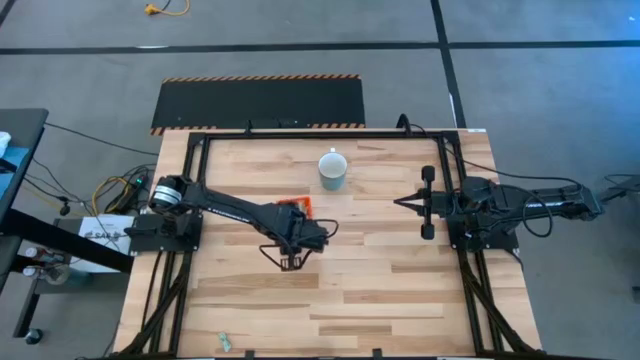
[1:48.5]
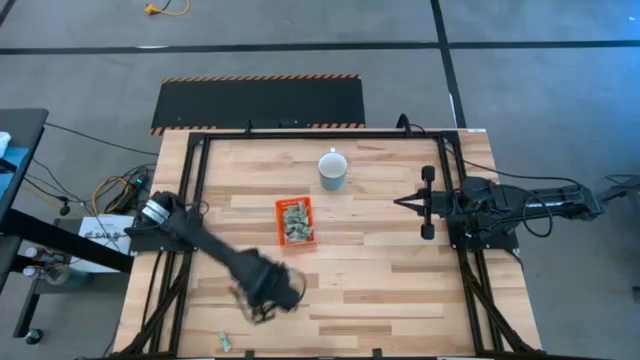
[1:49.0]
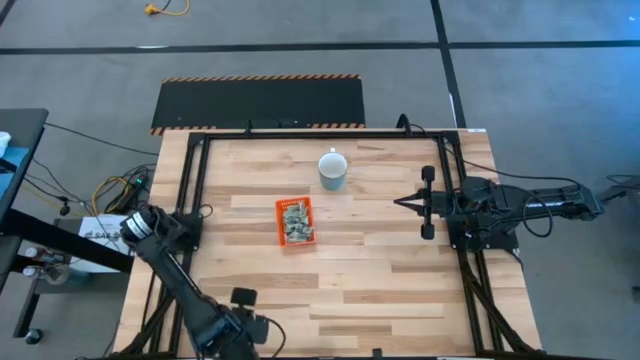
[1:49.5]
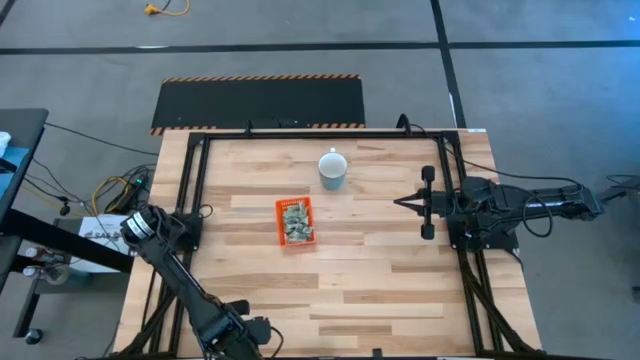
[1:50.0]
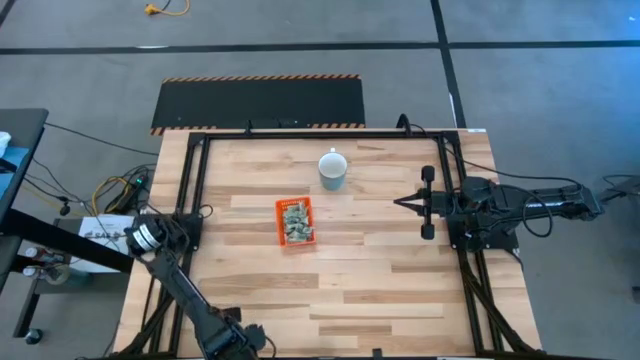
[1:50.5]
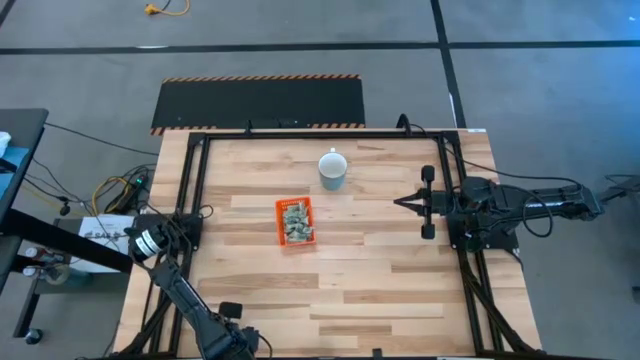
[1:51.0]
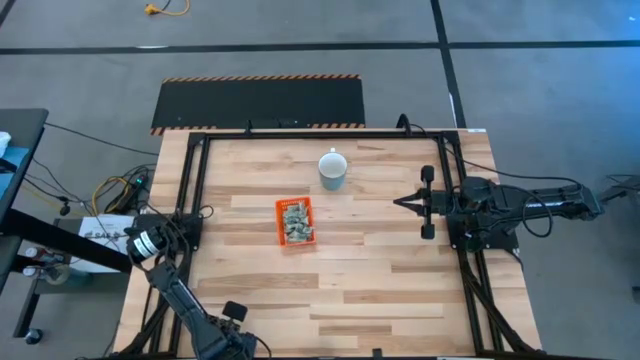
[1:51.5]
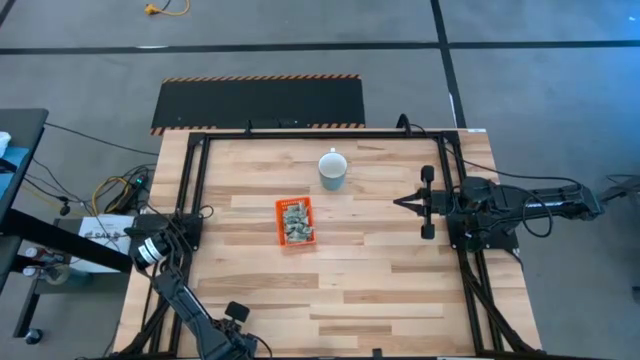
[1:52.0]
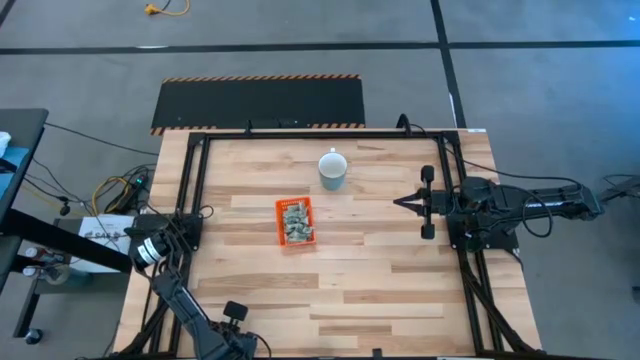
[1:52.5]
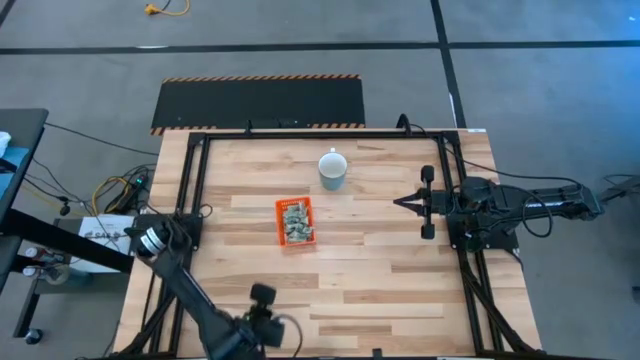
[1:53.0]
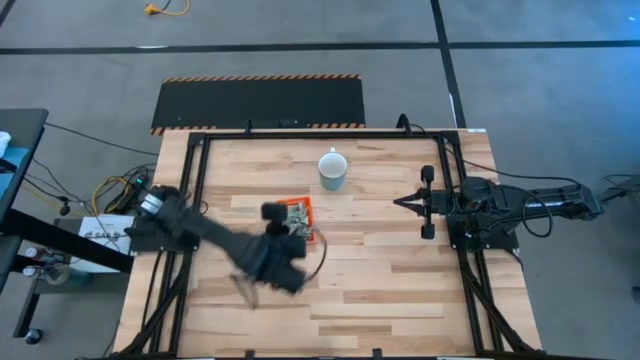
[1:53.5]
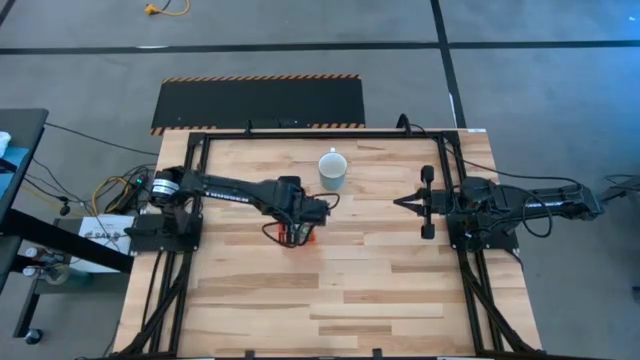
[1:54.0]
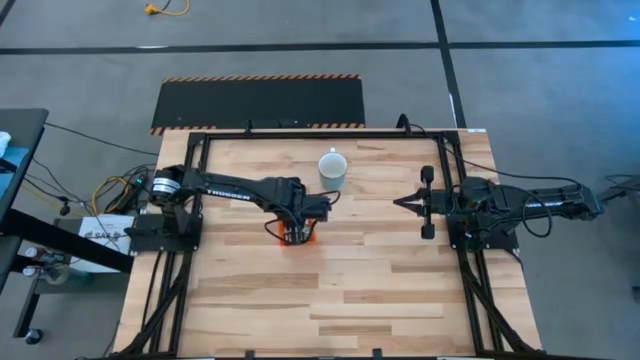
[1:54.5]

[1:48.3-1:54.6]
Task: Pick and place items into bin
Put the green stevia packet into the orange bin

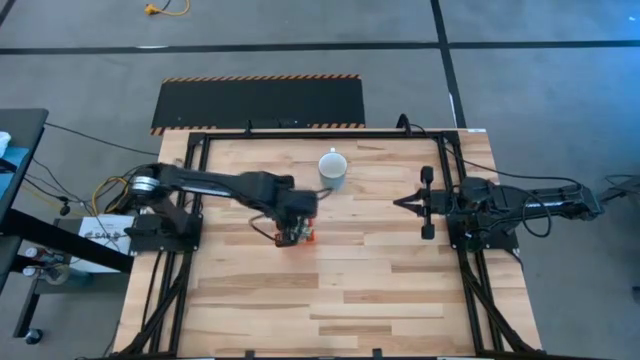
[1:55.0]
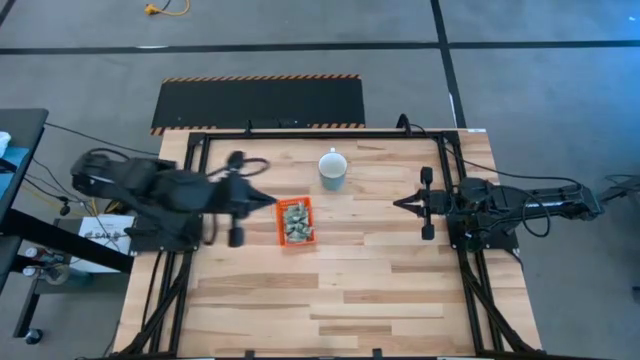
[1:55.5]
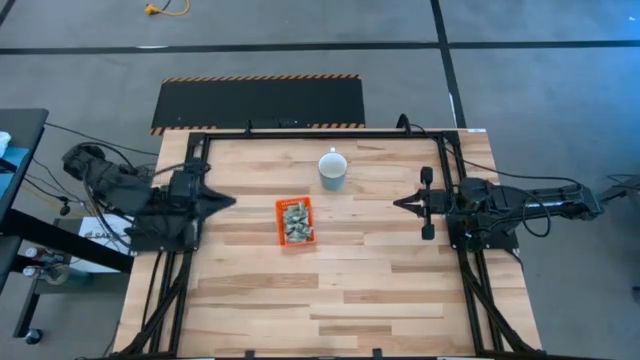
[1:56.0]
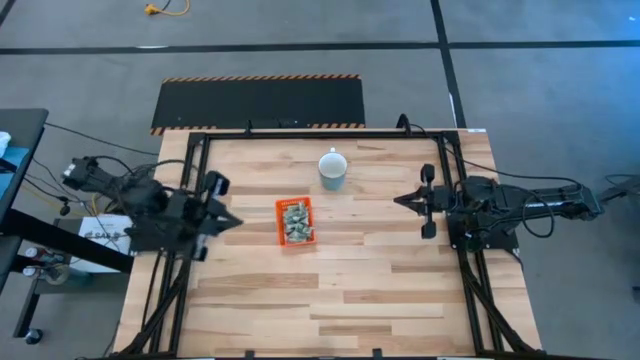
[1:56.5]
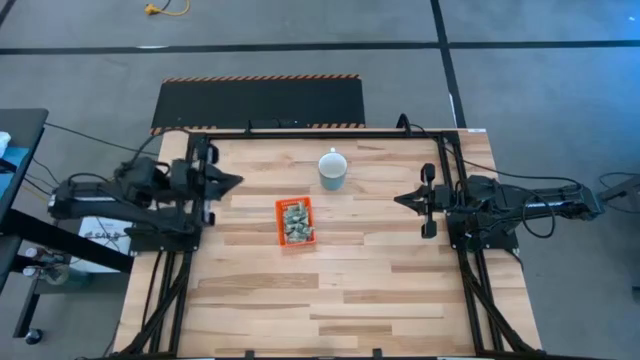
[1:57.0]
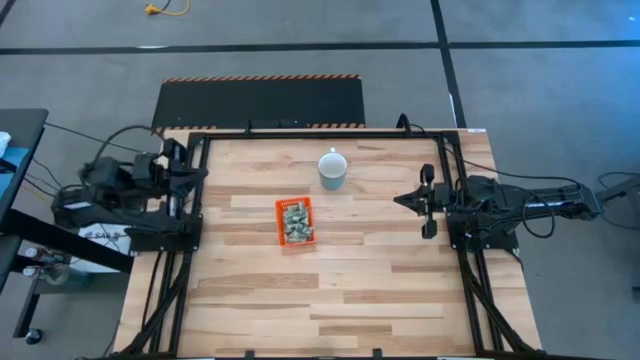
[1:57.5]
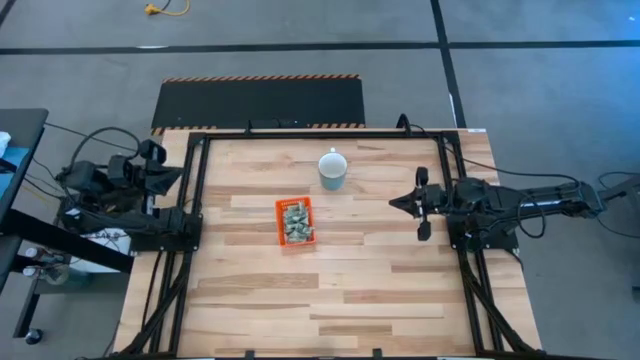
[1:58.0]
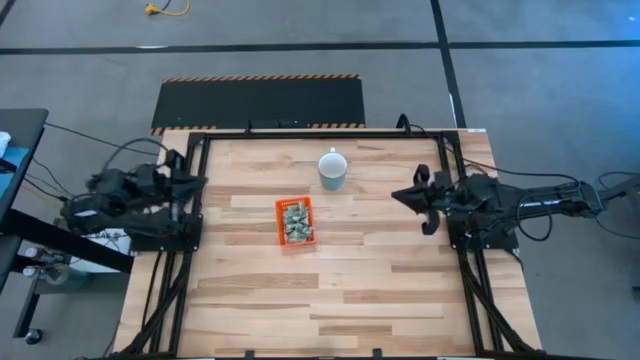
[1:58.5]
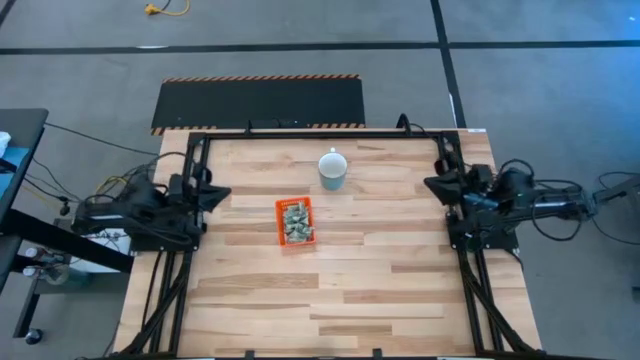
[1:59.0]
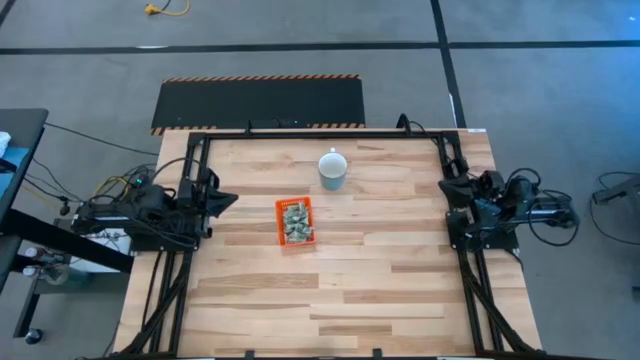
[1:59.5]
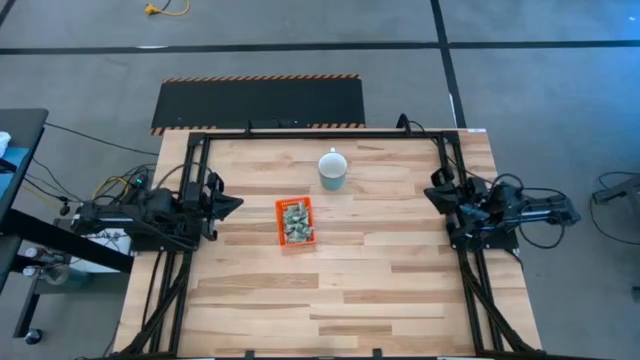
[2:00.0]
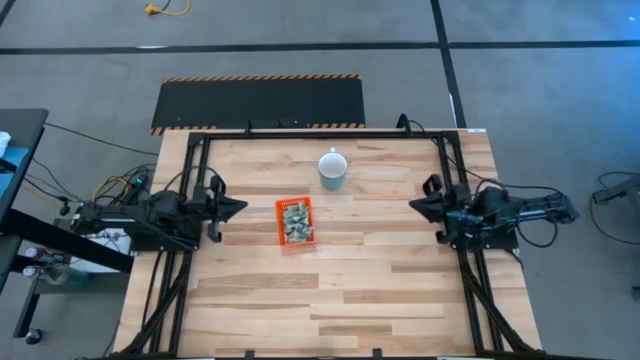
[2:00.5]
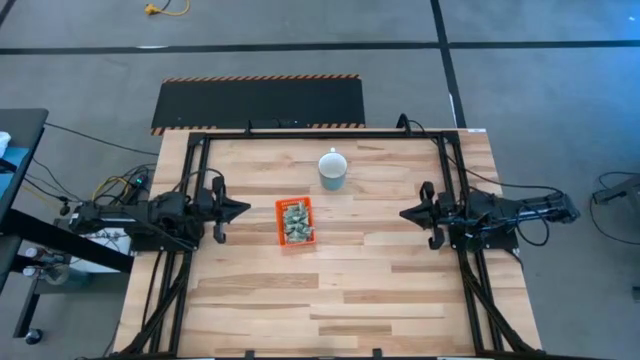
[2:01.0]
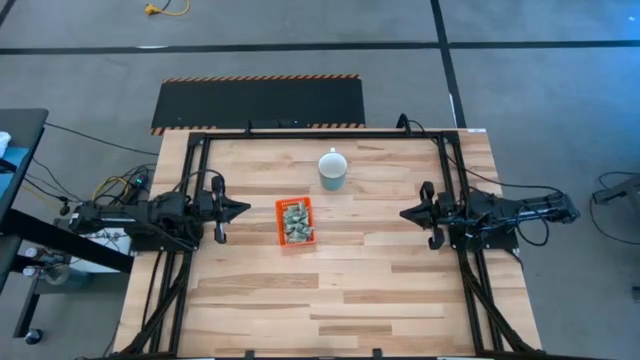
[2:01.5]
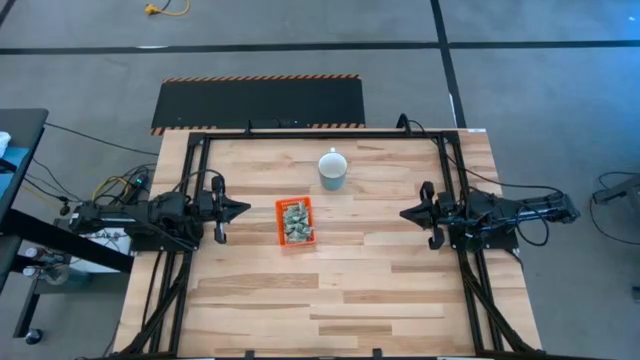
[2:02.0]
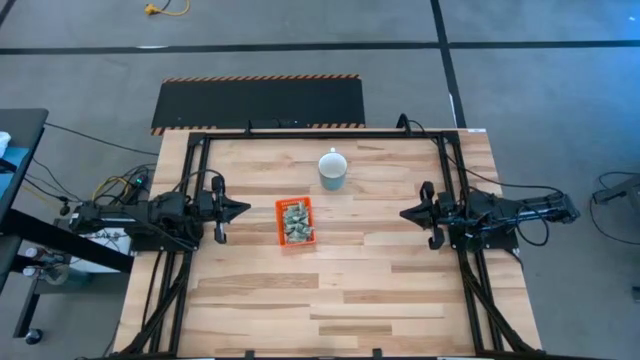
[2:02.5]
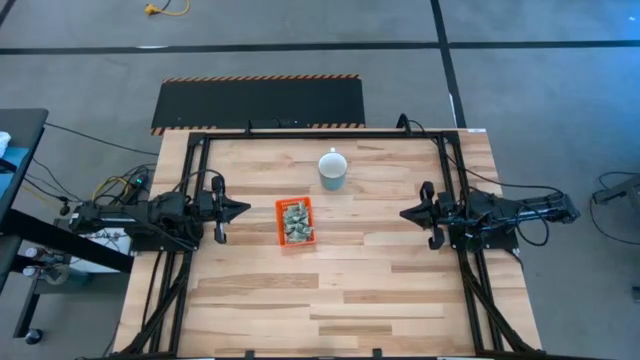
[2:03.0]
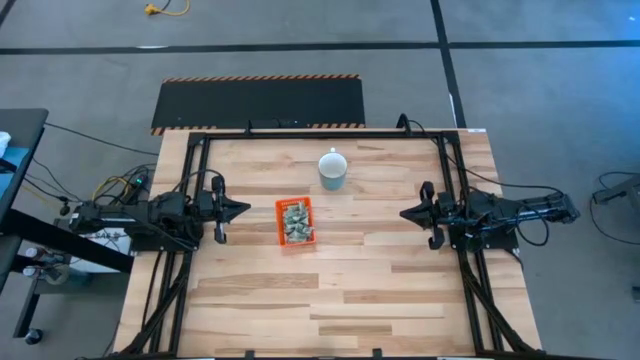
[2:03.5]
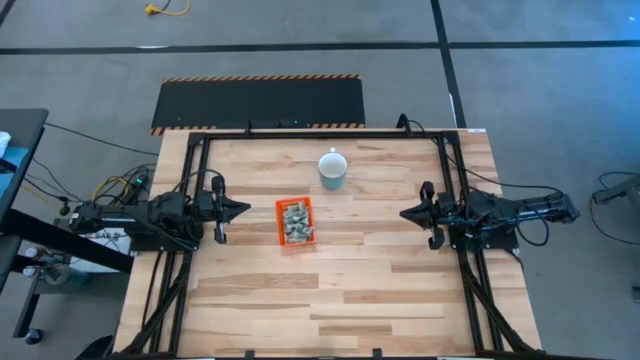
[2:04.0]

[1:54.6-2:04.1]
Return to Home Position

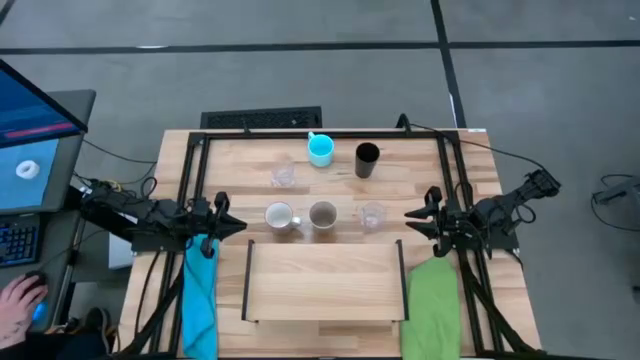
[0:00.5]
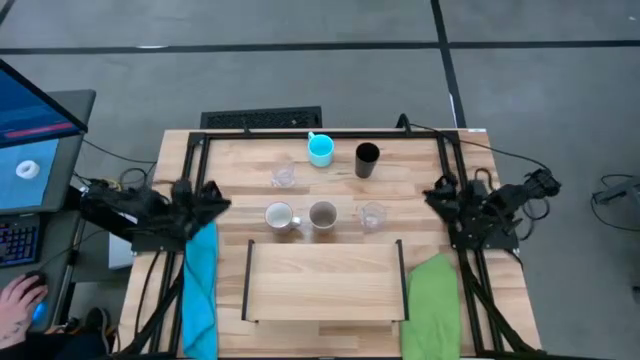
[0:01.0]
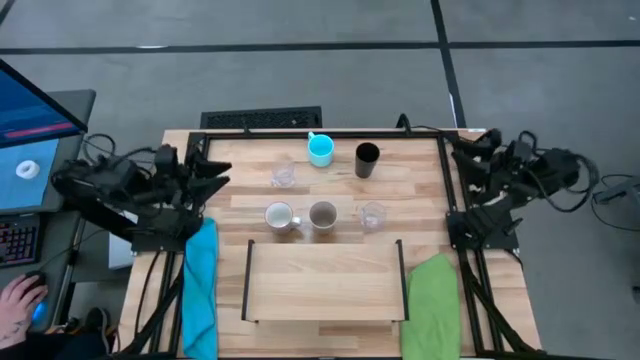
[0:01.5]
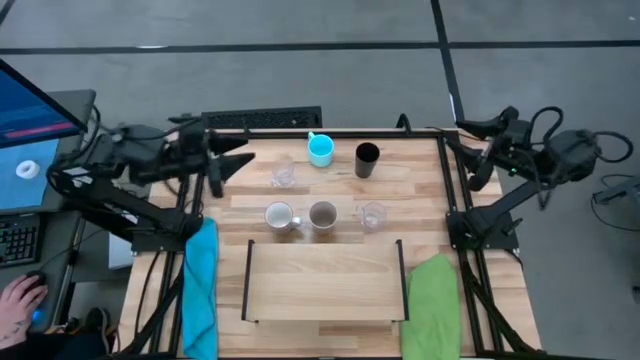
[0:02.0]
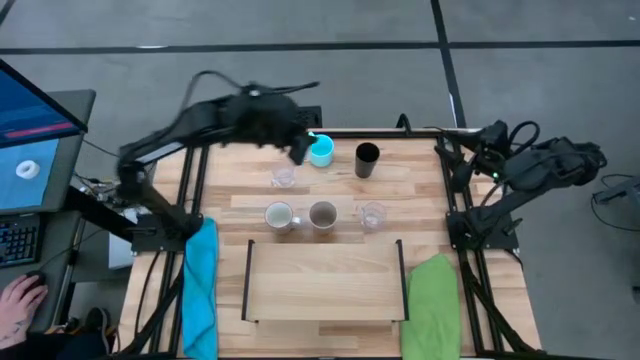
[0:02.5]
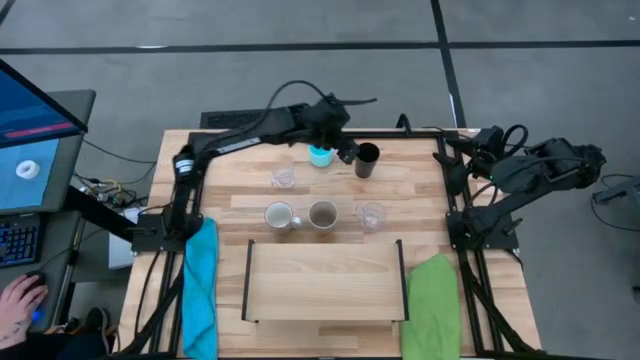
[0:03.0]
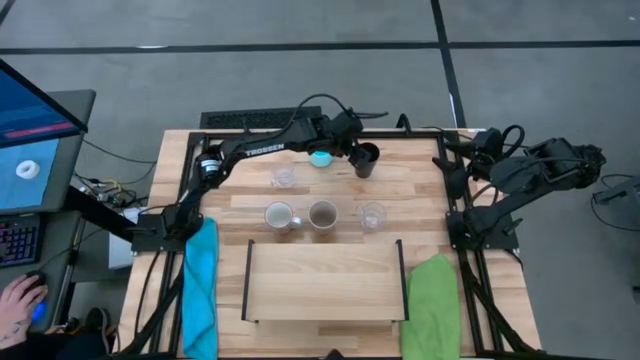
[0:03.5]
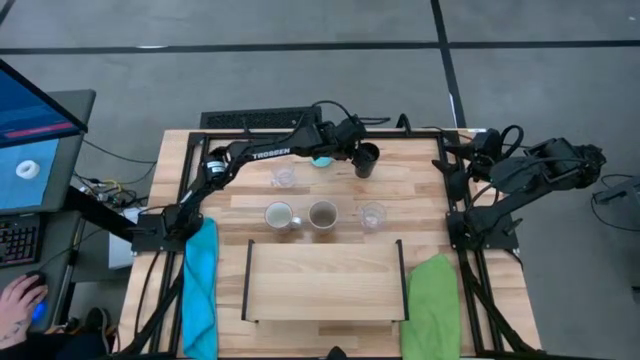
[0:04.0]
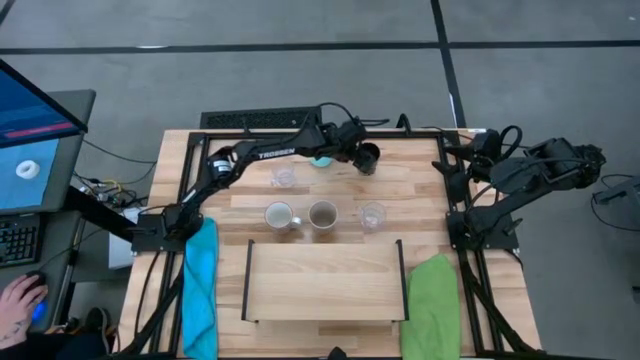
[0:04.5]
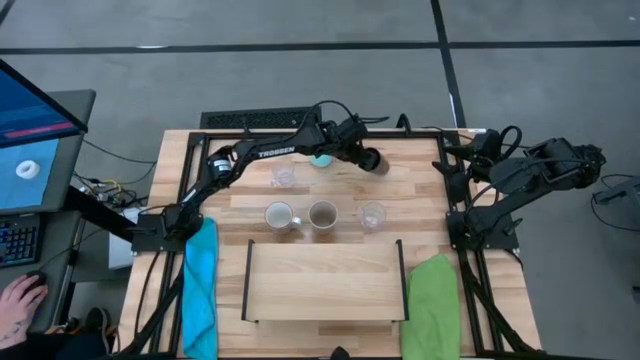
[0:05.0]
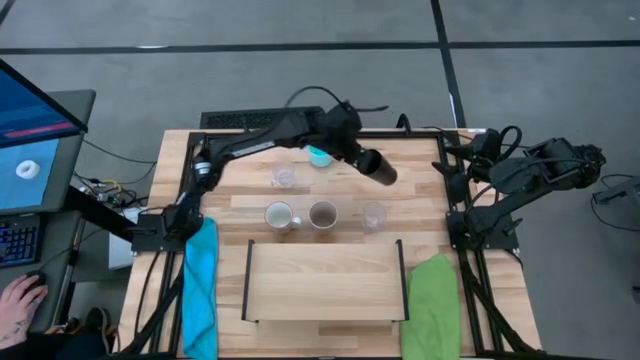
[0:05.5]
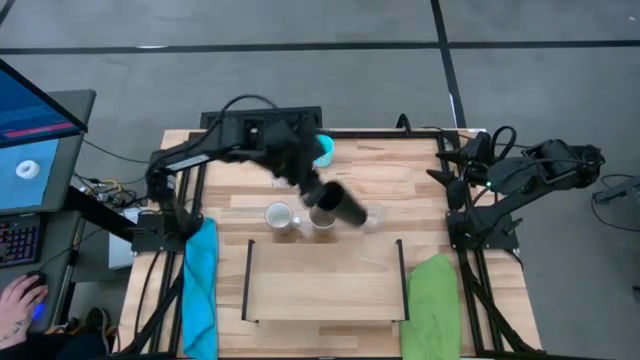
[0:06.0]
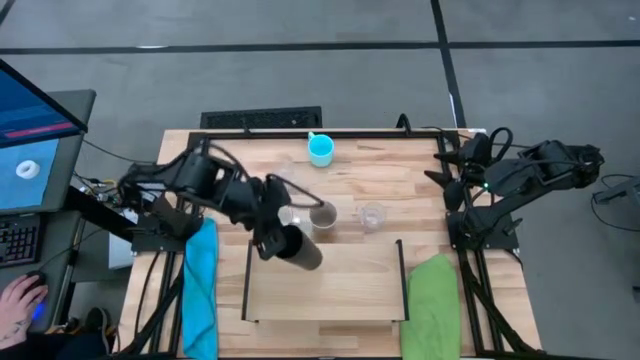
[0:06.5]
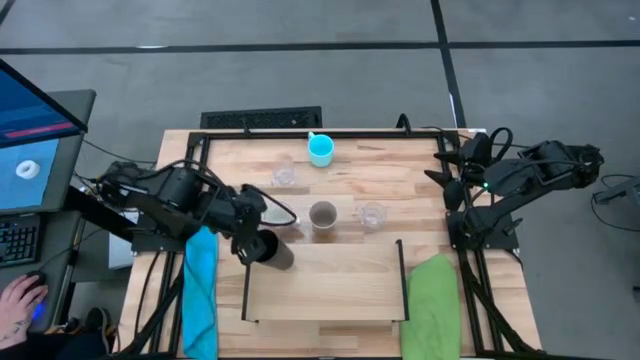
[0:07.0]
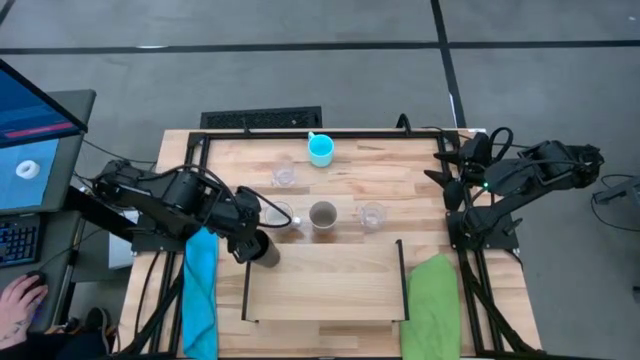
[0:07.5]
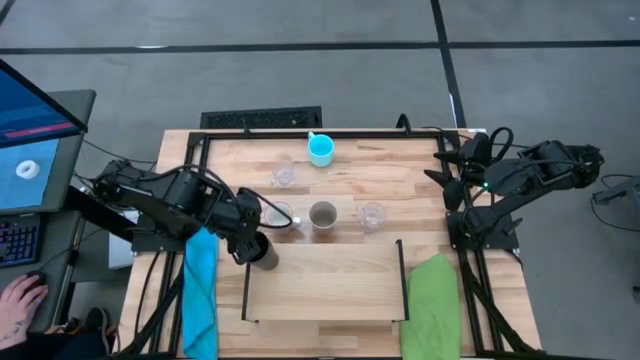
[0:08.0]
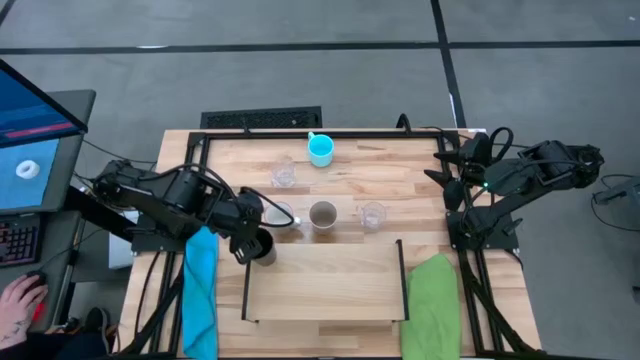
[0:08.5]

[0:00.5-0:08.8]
Task: Stack small to large cups/mugs on shelf
Put the black cup on the shelf
